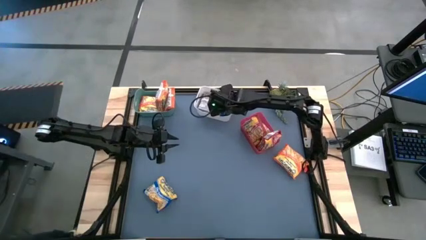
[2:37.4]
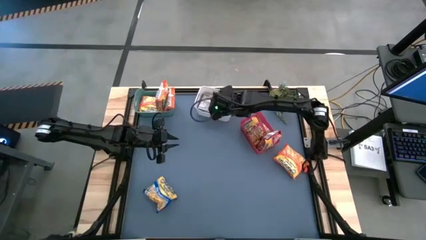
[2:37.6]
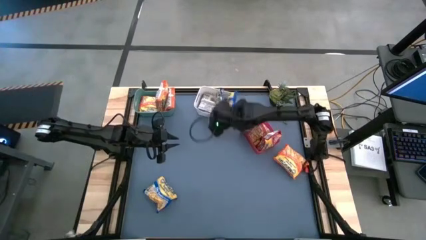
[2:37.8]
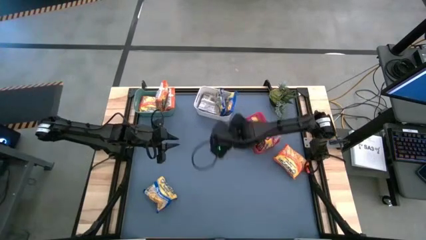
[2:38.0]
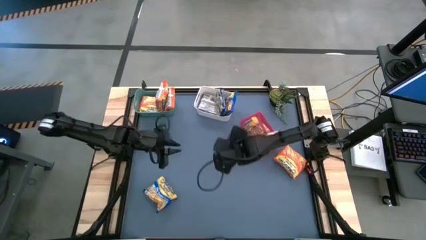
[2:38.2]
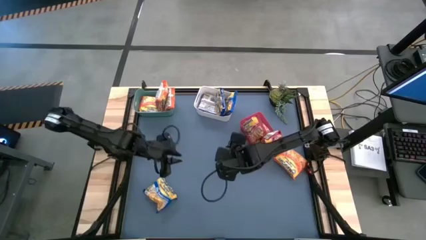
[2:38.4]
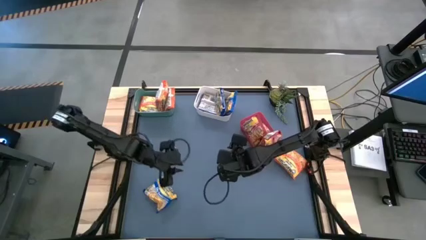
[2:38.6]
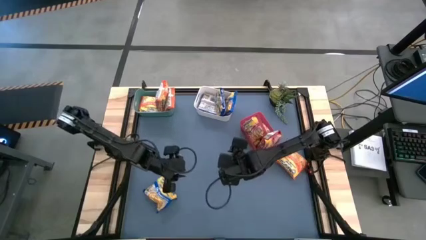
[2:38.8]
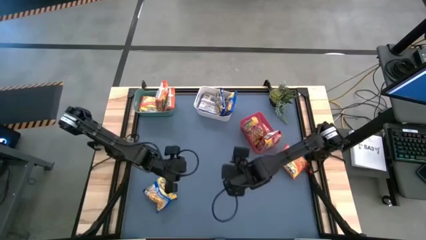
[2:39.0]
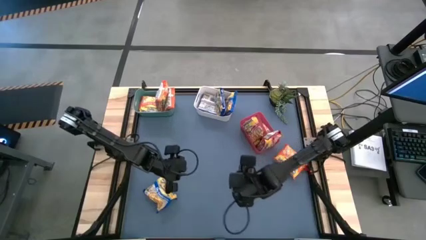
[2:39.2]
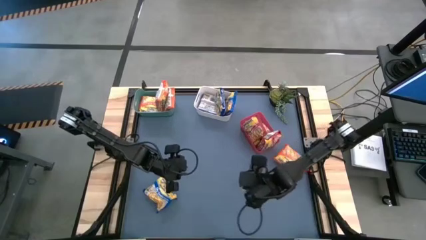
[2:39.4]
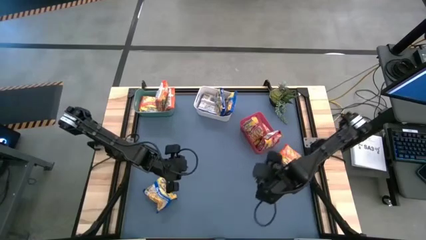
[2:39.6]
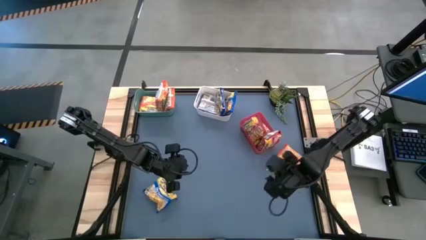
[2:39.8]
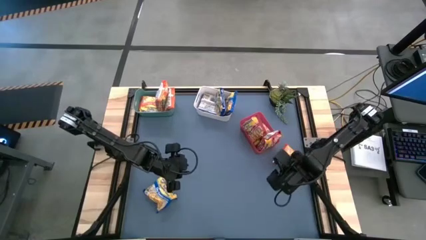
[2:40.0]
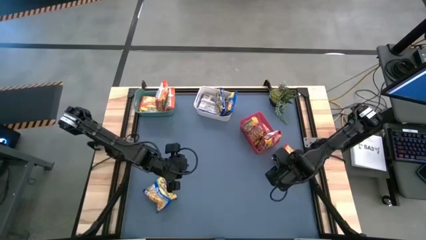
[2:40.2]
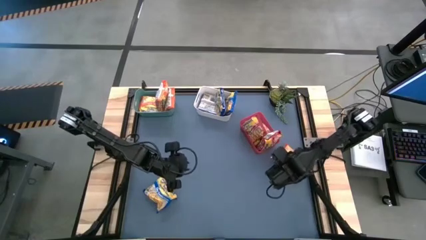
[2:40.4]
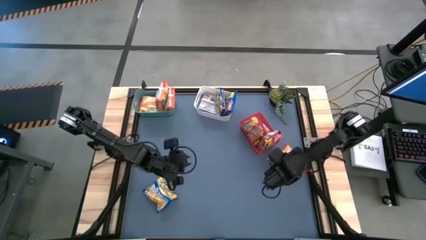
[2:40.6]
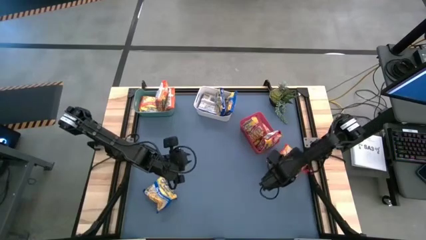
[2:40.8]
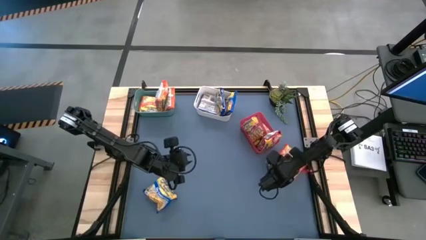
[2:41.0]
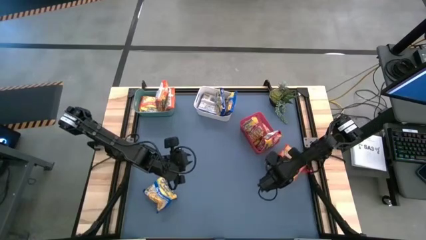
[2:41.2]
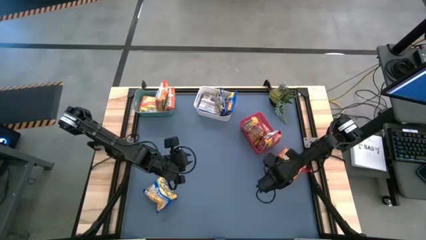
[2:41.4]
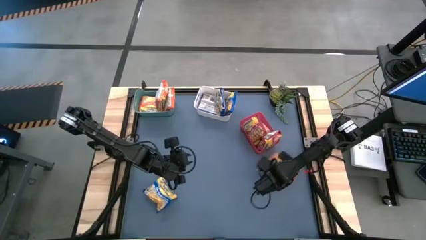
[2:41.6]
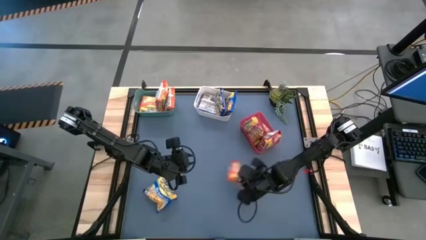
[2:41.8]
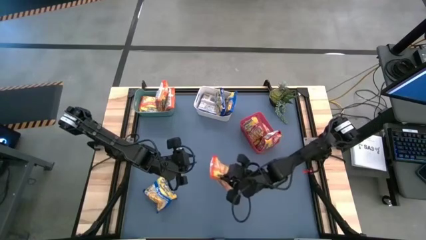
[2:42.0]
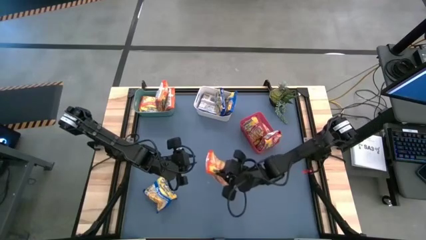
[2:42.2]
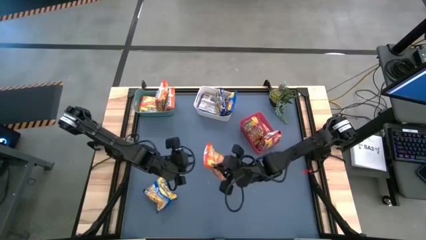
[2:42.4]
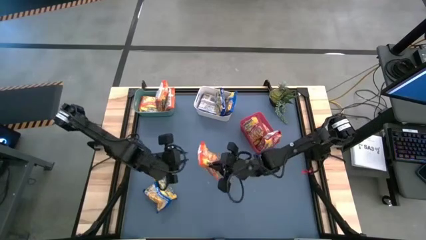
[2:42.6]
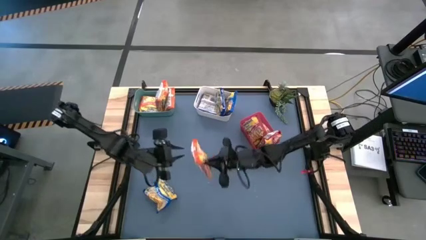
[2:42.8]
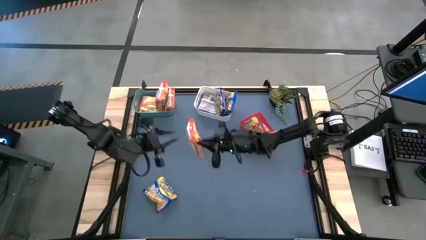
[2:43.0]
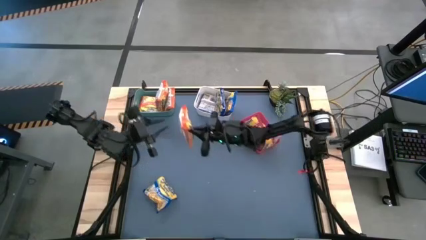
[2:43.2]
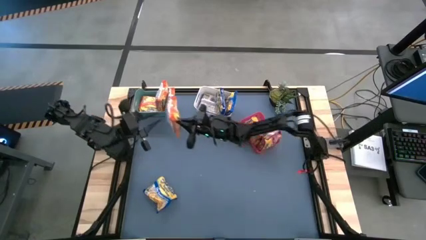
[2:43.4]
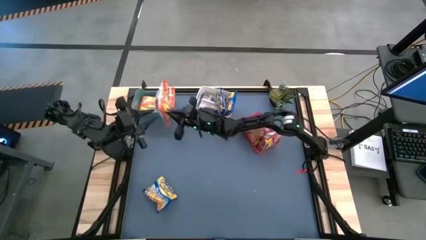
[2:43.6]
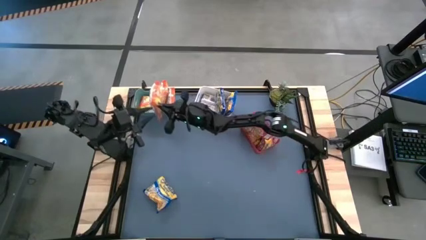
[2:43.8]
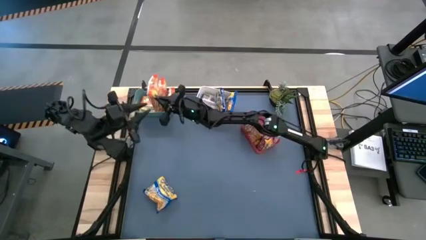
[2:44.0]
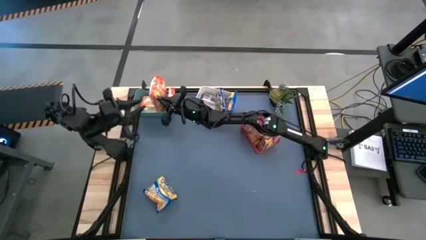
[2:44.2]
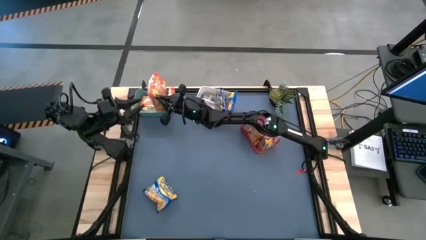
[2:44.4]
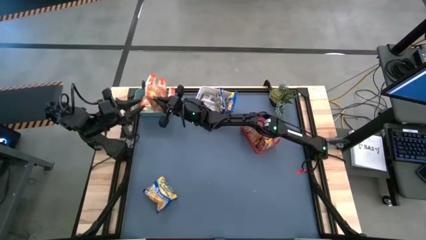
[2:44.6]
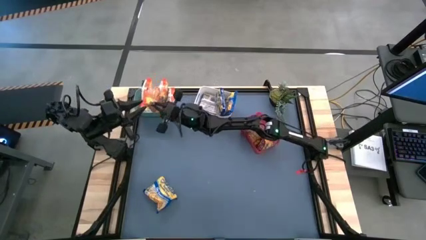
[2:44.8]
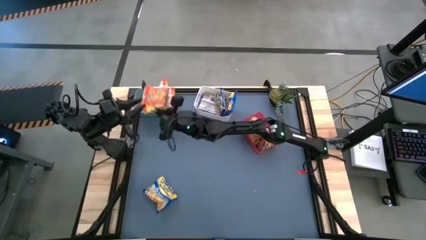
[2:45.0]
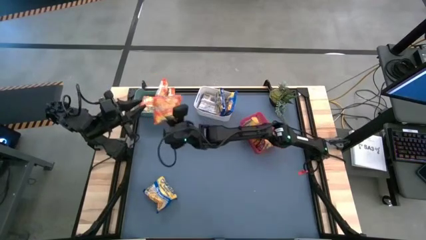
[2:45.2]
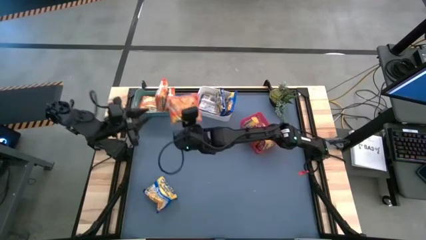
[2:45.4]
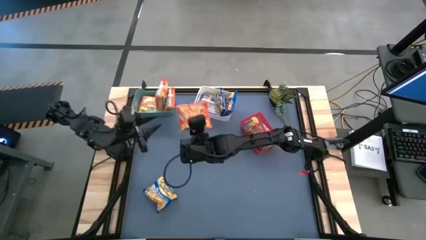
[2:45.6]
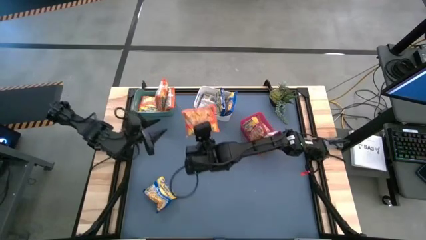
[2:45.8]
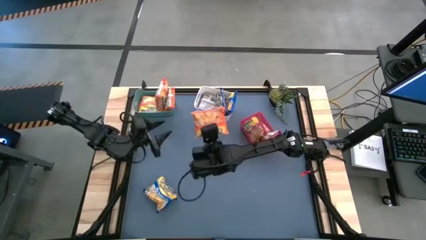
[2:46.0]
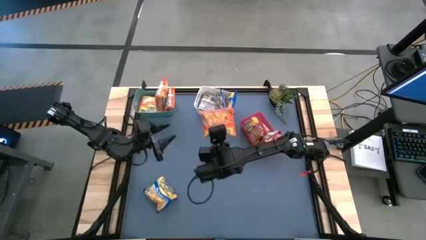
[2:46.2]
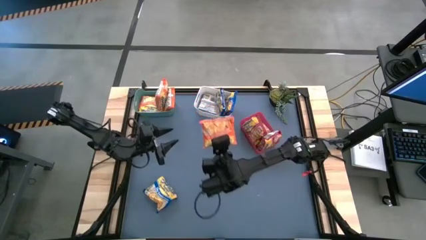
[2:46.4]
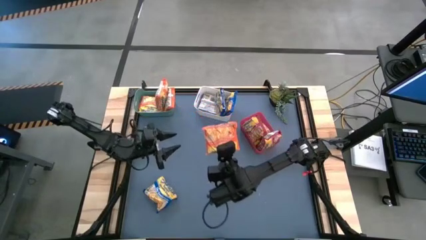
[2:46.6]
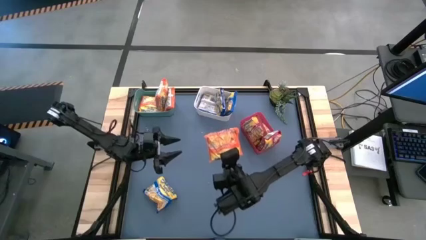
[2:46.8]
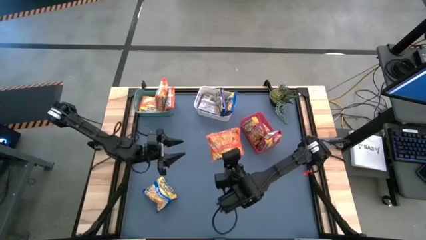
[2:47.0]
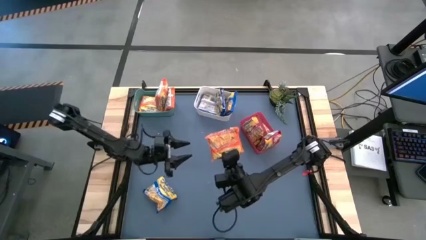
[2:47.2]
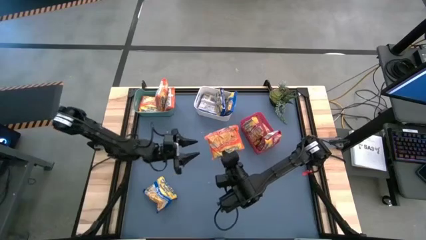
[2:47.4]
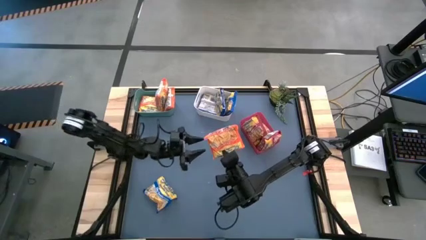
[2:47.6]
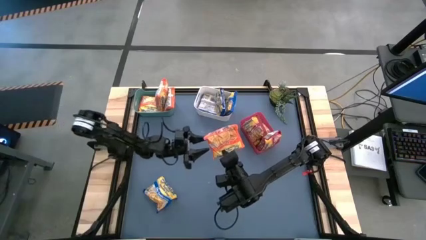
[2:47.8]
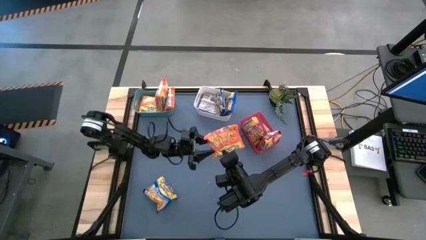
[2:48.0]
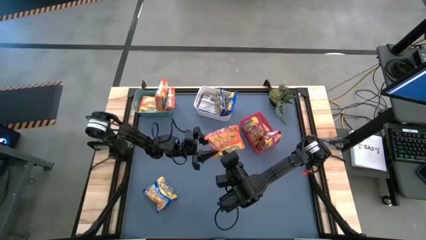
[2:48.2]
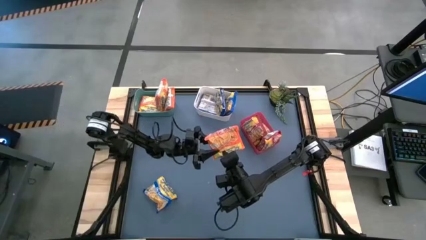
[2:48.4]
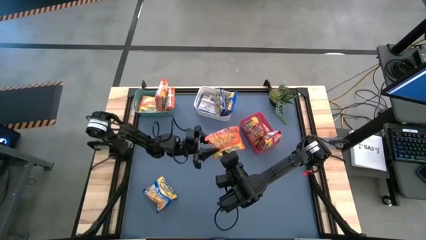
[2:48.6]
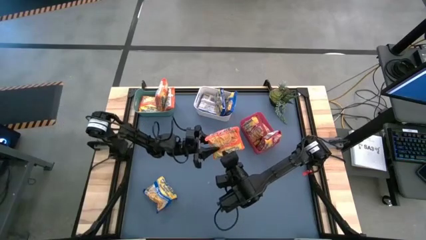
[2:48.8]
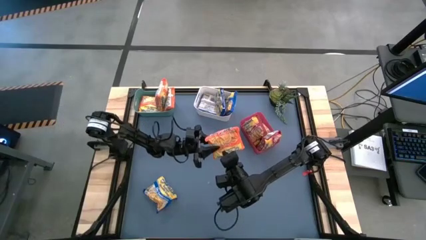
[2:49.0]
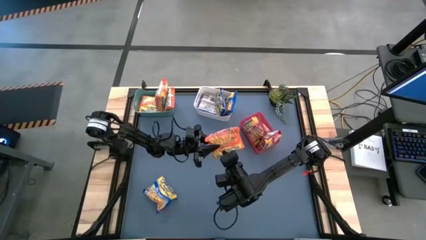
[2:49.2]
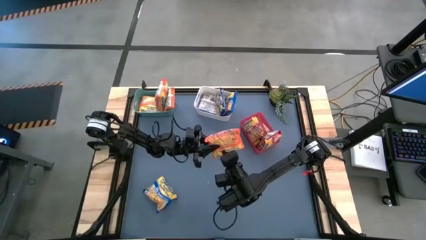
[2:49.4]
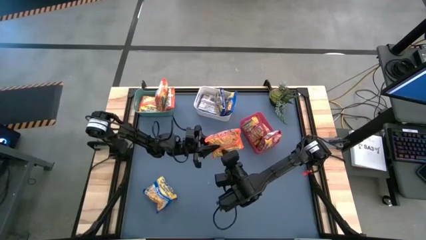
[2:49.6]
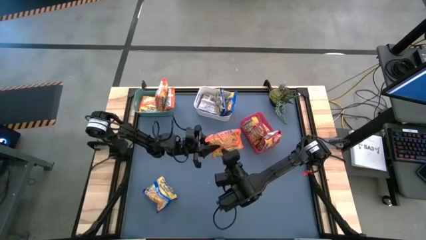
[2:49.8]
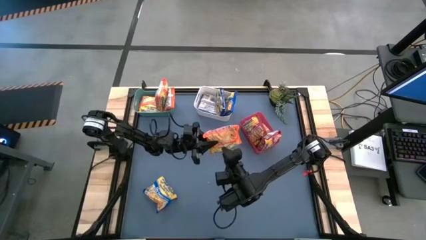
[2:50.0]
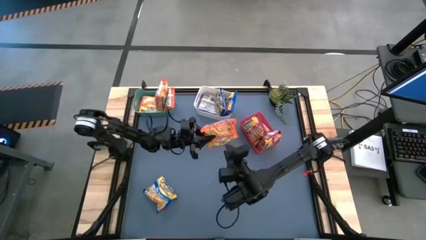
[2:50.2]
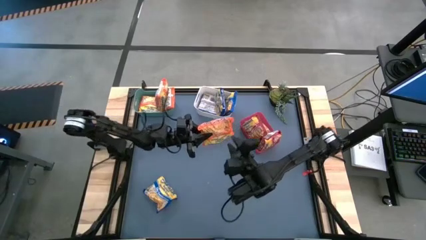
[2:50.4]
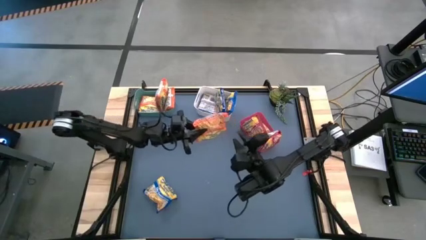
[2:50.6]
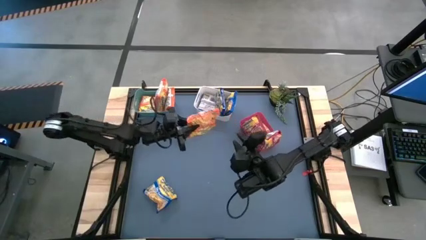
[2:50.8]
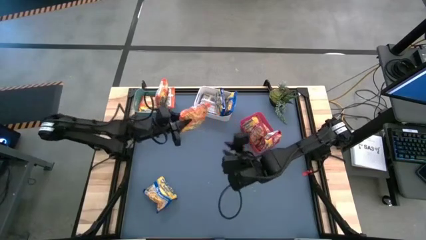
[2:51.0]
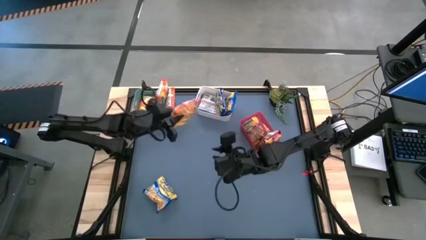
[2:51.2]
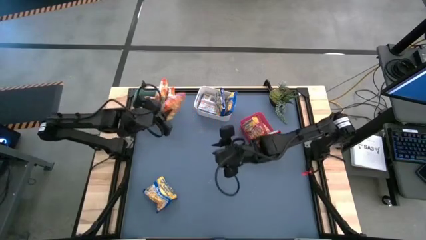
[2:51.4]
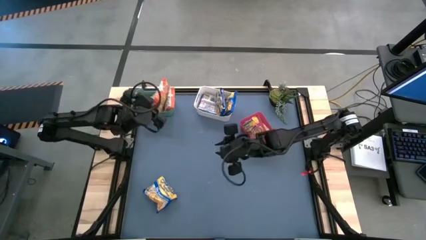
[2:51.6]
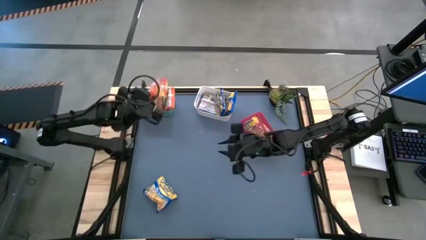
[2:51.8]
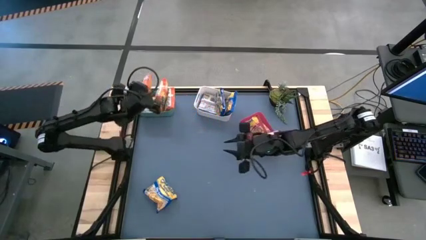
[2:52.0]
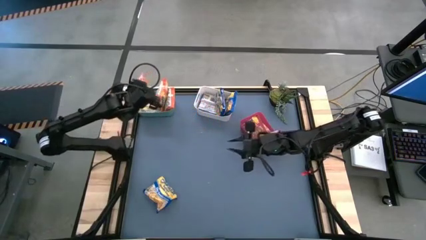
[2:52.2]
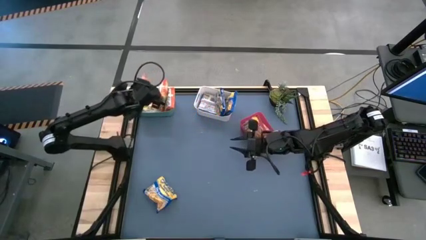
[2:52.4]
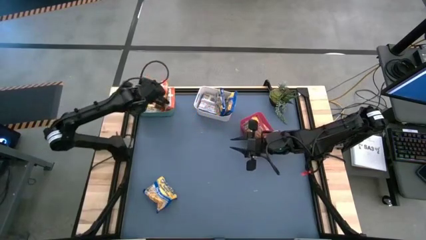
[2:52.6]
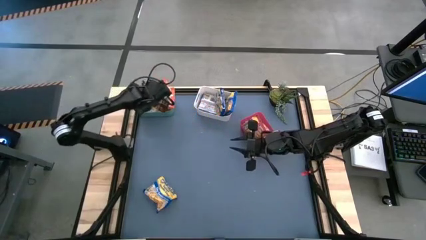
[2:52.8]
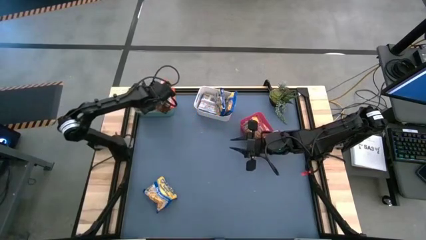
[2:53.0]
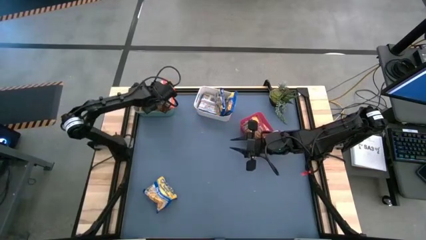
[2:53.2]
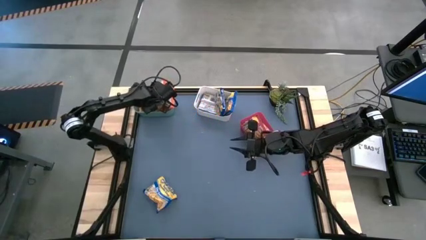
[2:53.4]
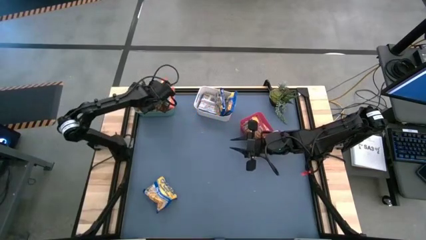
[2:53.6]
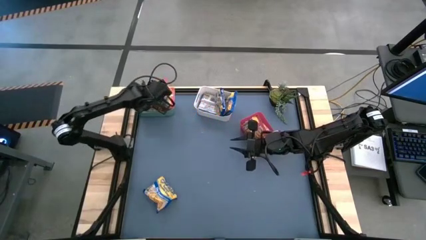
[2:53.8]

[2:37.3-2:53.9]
Task: Sort Maruchan noodles
Put the orange noodle pack into the green bin
